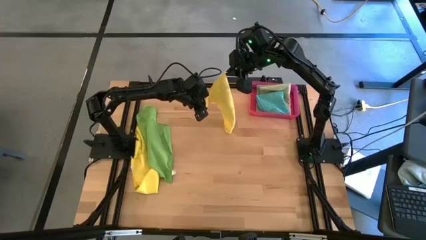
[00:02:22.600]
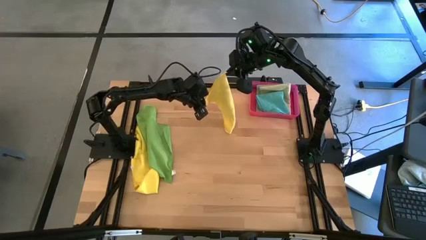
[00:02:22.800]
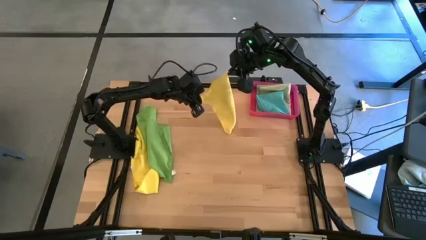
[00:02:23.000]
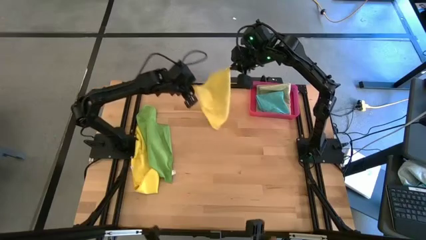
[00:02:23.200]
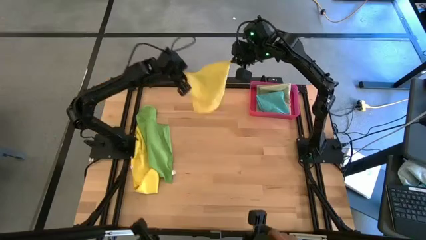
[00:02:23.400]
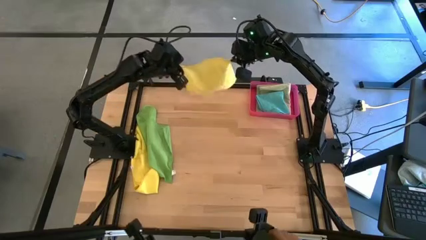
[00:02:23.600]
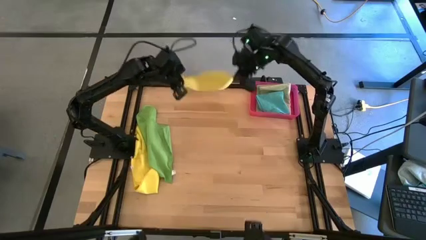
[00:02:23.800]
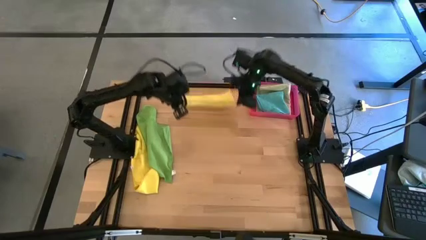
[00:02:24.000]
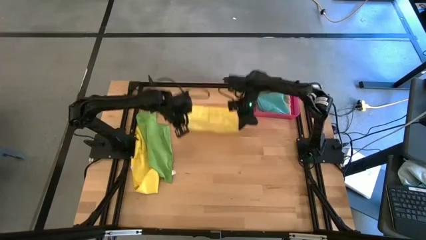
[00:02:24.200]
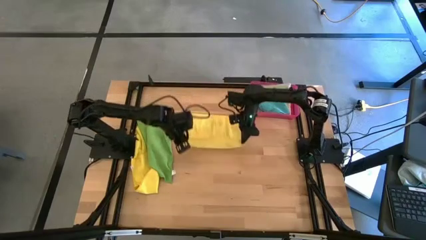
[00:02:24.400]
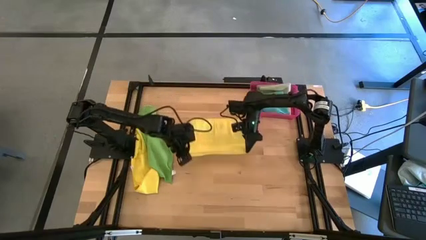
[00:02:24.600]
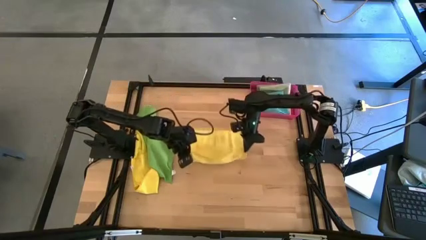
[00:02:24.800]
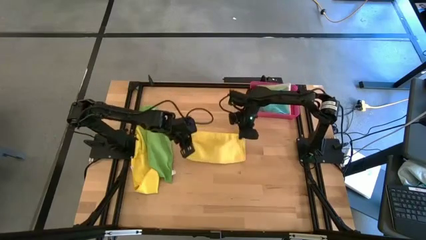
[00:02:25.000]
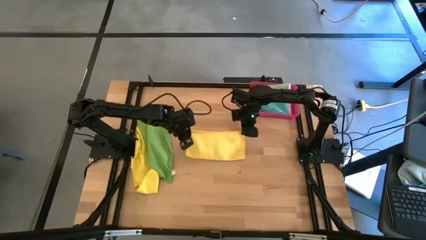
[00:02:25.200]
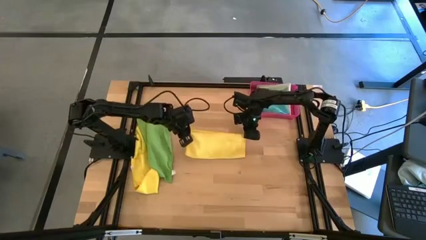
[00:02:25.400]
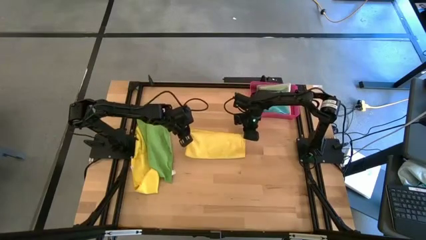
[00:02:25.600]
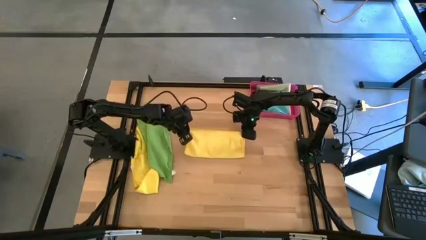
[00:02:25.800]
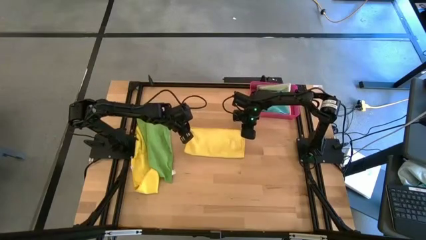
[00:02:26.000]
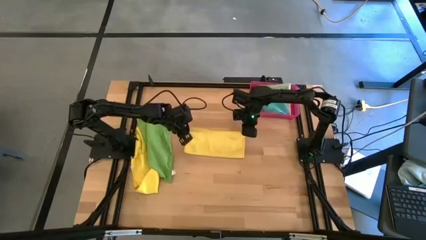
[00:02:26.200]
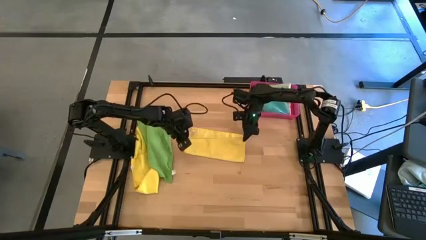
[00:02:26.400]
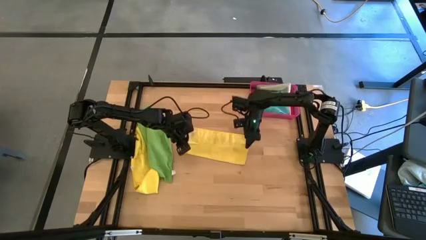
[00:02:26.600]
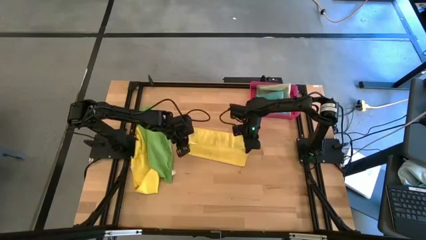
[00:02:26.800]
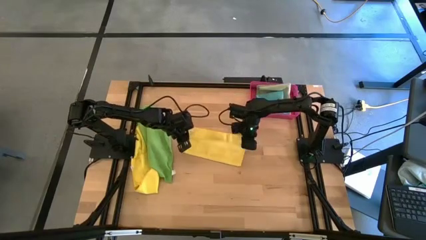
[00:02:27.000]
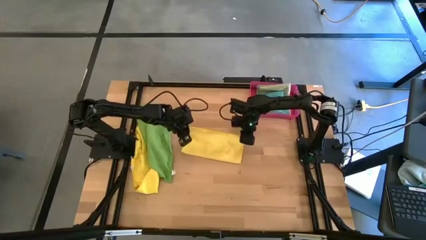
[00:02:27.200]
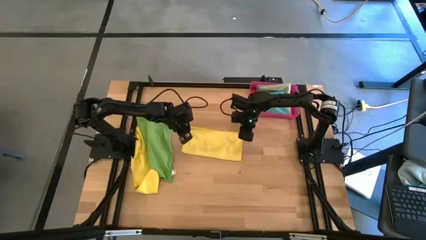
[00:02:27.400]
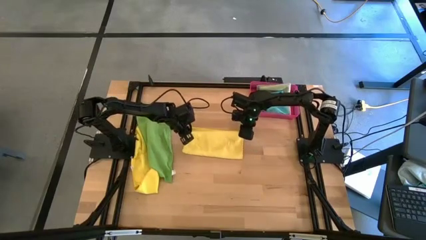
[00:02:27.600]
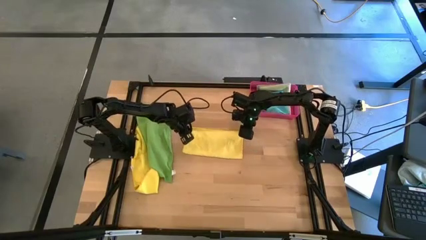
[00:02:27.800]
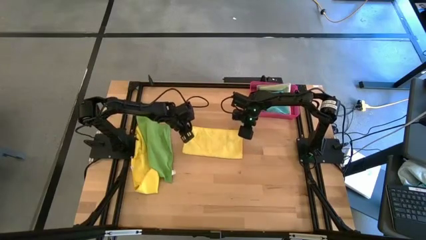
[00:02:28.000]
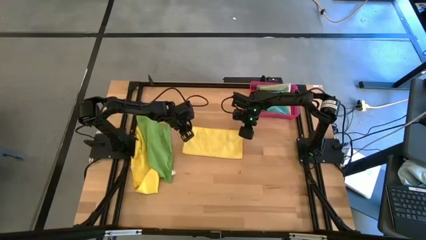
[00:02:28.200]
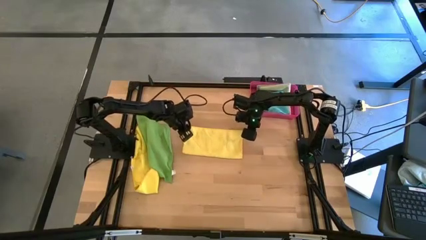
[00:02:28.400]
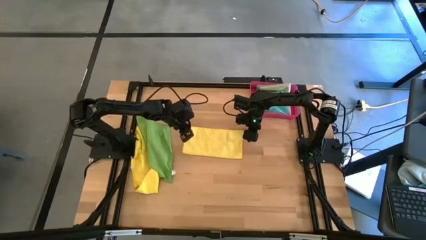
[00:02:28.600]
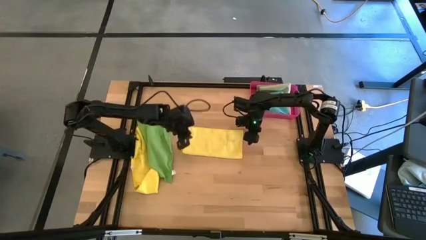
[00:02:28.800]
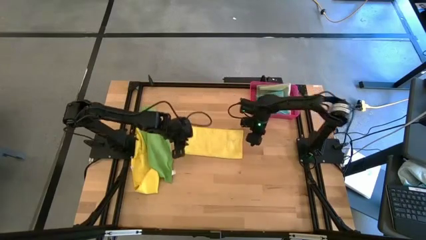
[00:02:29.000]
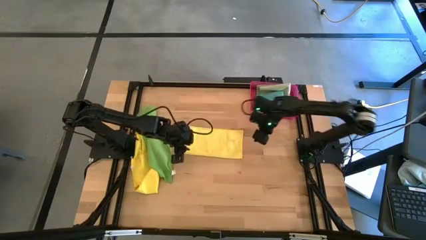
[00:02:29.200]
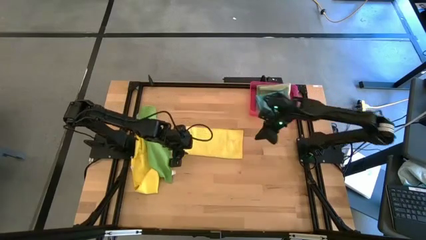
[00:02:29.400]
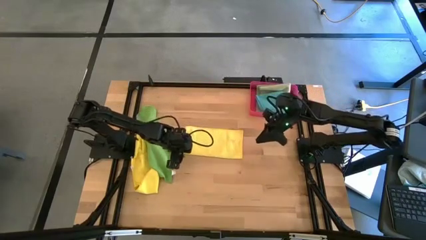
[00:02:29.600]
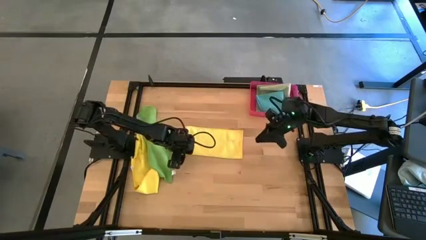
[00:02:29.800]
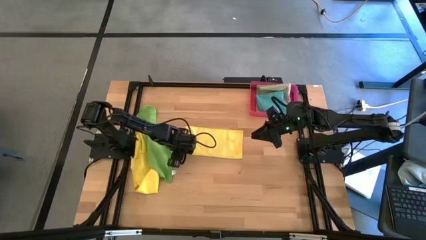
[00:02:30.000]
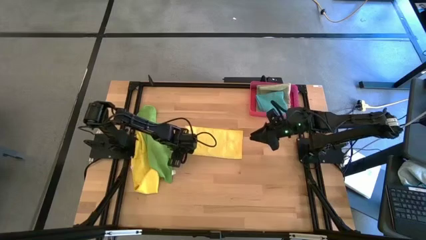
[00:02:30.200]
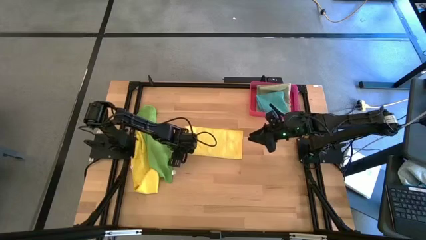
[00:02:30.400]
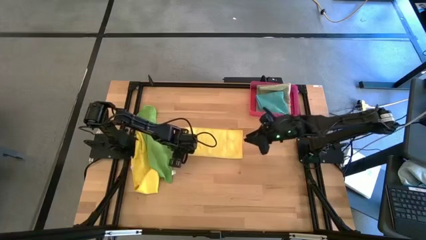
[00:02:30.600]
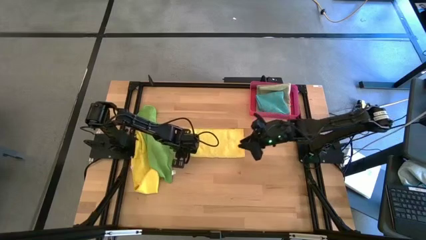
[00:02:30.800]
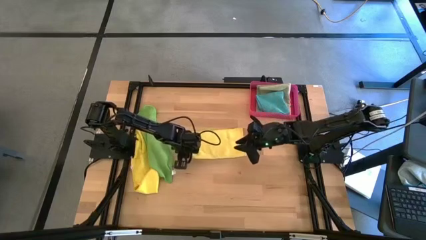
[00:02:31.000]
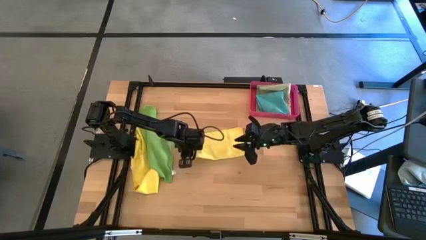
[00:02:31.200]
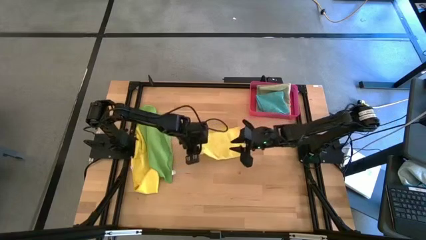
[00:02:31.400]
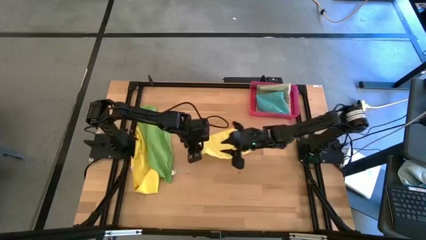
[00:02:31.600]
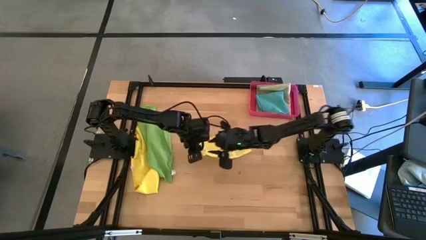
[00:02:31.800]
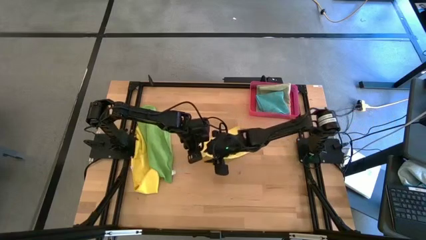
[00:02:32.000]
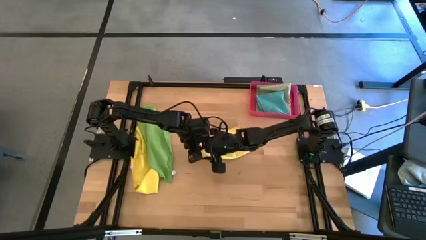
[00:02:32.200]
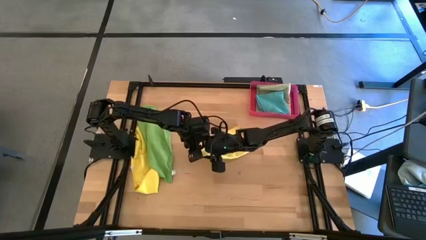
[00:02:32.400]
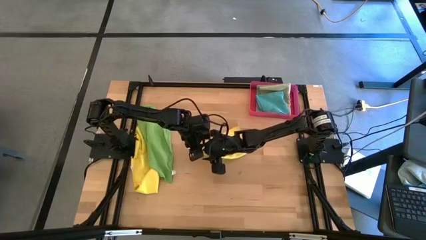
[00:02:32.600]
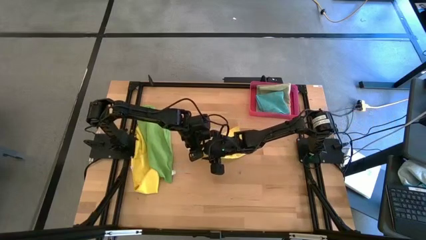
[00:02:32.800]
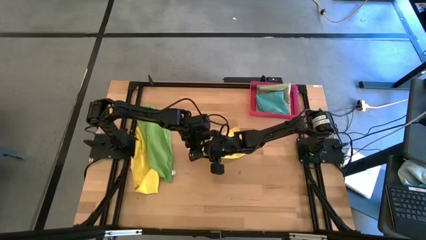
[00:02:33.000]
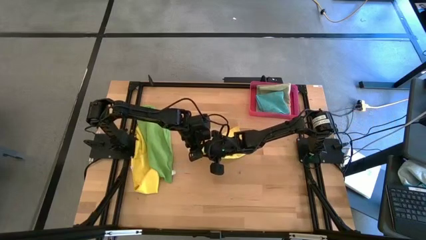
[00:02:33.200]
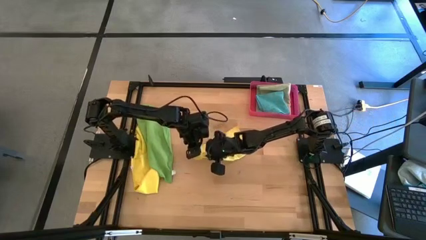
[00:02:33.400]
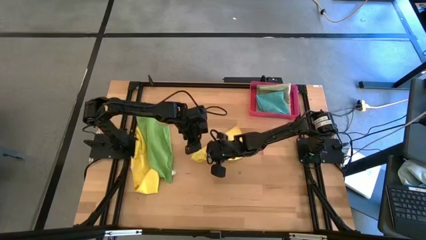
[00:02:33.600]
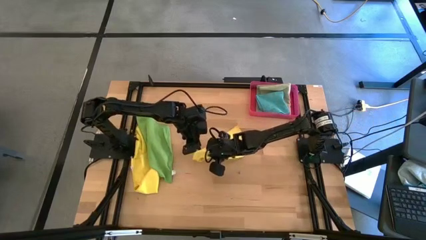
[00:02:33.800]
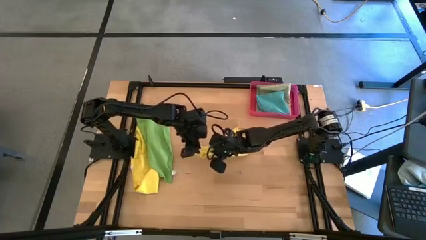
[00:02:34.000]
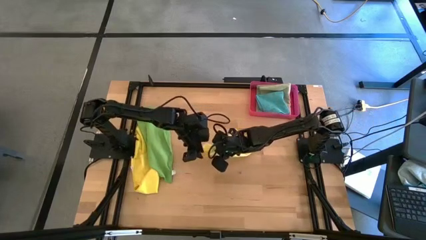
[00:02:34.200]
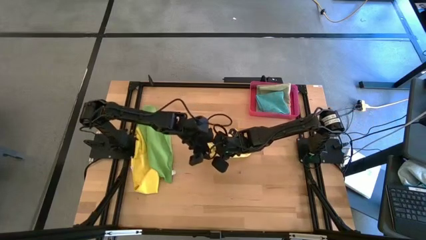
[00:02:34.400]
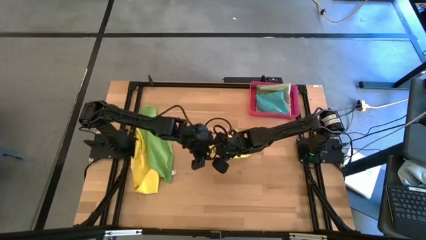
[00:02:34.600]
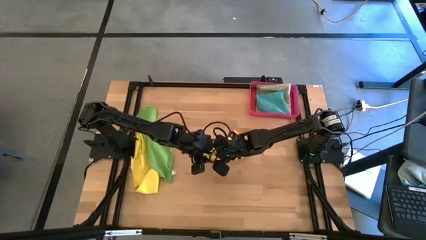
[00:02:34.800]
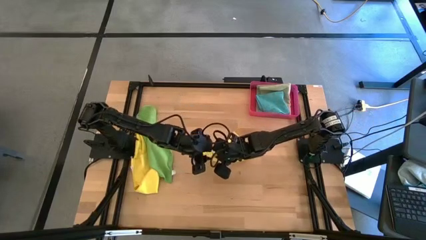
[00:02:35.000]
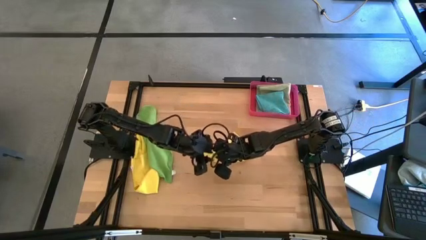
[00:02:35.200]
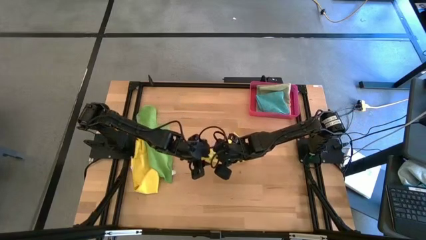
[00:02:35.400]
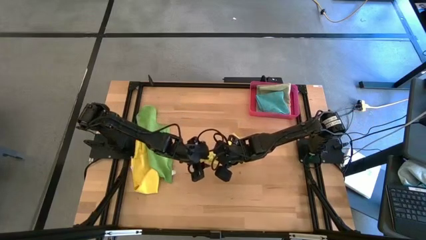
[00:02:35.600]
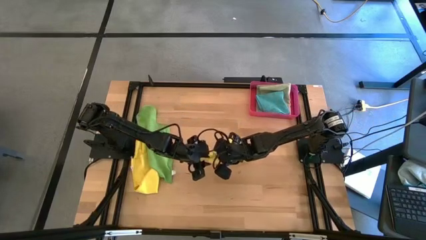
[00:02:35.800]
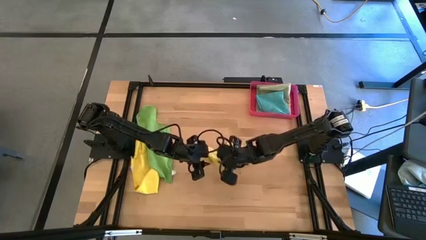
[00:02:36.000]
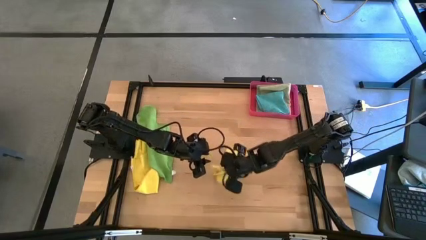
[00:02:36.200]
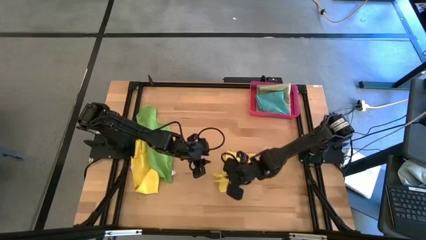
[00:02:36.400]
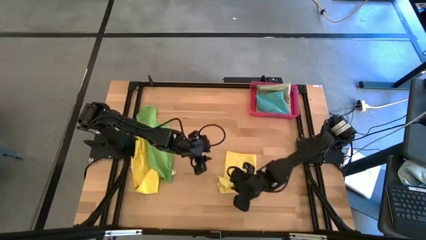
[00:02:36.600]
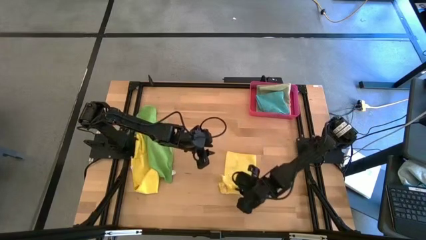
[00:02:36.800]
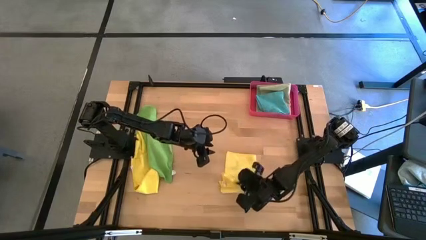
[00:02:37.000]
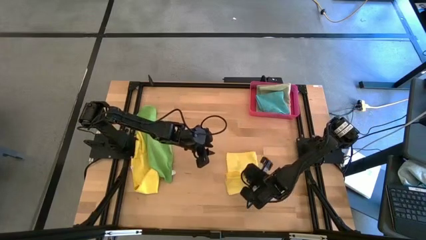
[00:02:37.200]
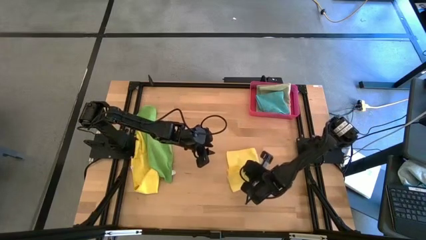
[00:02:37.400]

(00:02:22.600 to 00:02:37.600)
Task: Fold microfiber towels
Fold the right yellow towel

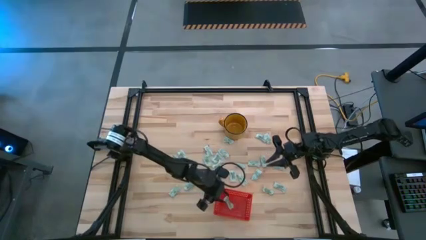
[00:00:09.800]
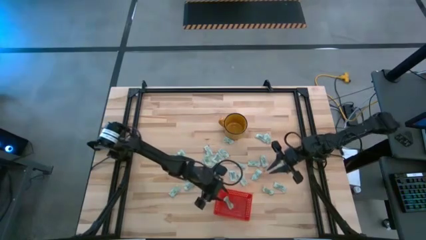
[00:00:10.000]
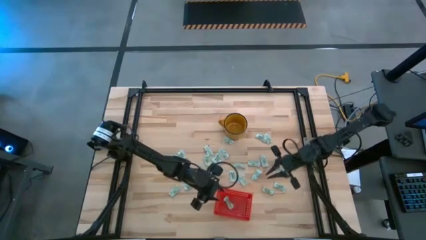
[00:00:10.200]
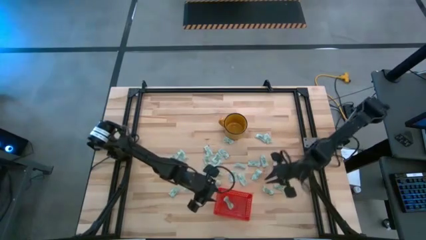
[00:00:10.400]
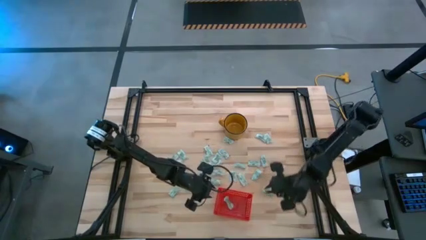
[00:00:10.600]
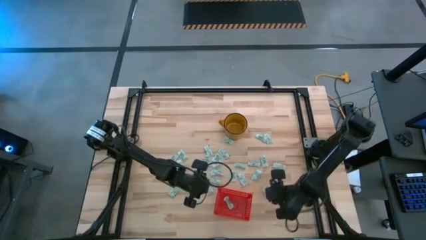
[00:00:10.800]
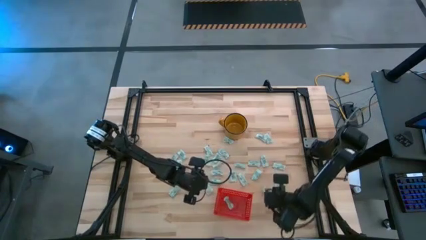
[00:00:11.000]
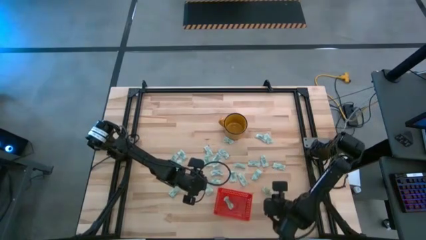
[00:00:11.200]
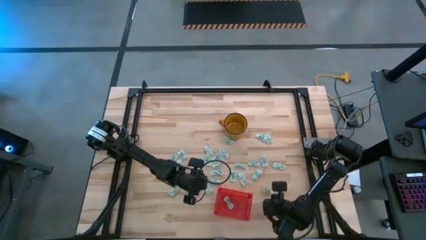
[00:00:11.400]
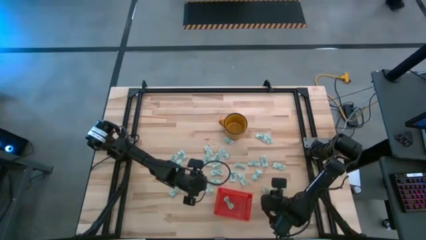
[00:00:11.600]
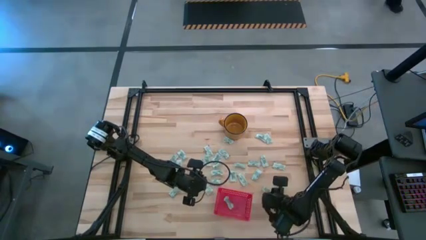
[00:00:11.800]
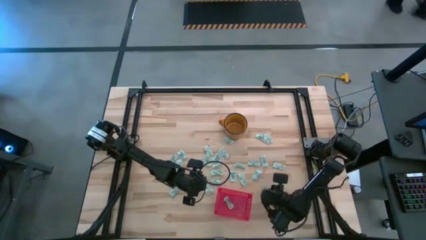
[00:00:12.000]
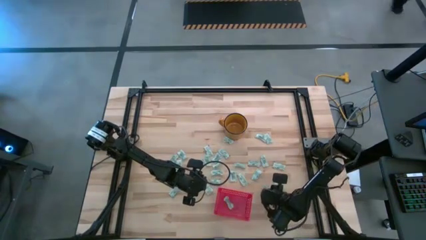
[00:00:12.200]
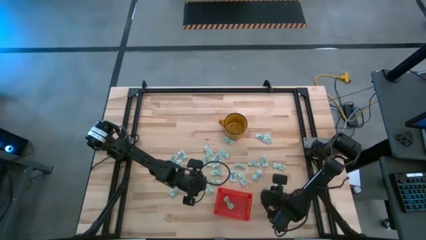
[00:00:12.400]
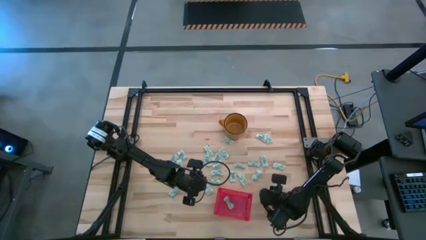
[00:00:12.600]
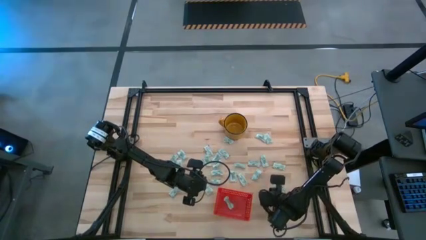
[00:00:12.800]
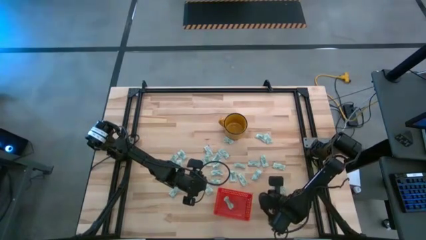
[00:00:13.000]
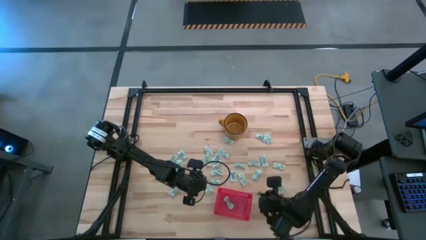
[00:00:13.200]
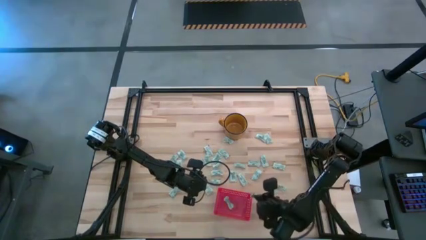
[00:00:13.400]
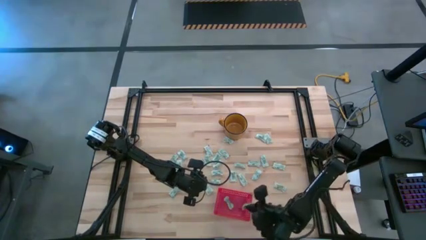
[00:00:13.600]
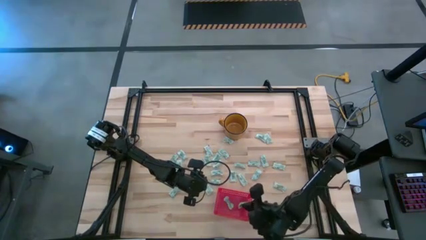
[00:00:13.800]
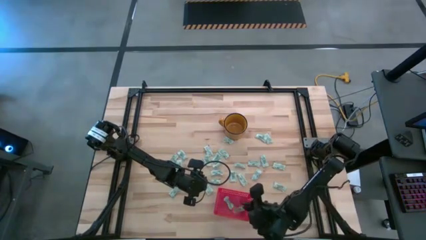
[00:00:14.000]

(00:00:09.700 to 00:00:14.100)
Task: Pick and place Stevia / Truvia into bins
Put the stevia packet into the bin
